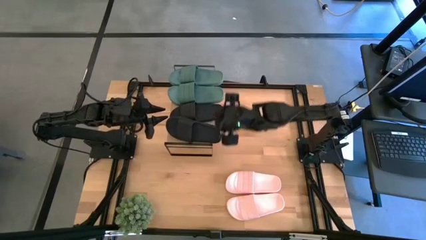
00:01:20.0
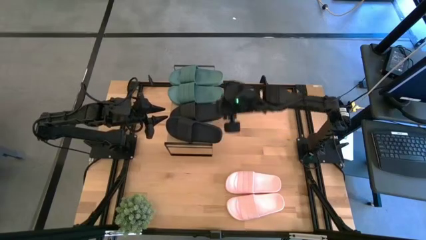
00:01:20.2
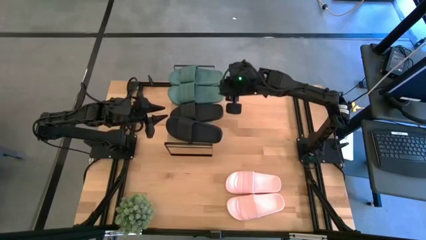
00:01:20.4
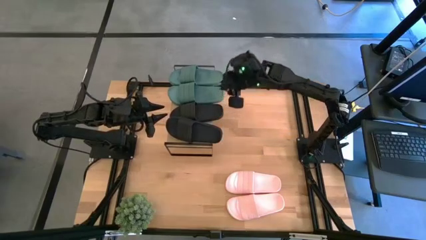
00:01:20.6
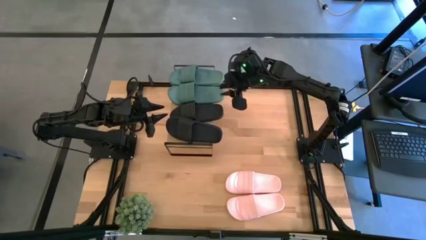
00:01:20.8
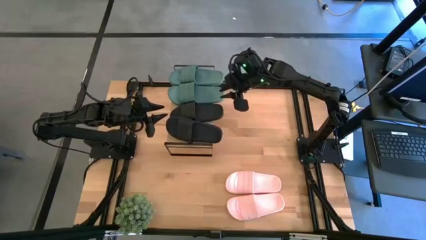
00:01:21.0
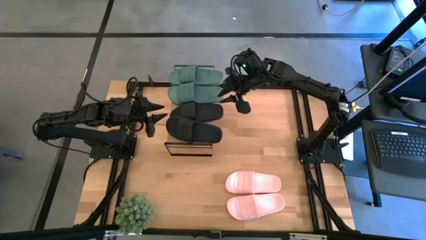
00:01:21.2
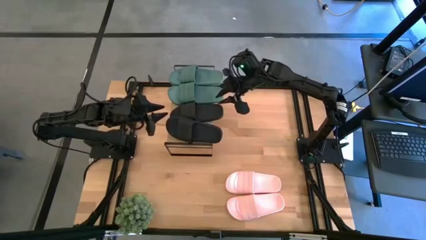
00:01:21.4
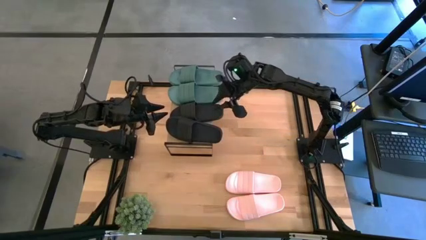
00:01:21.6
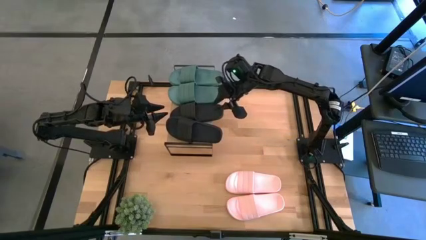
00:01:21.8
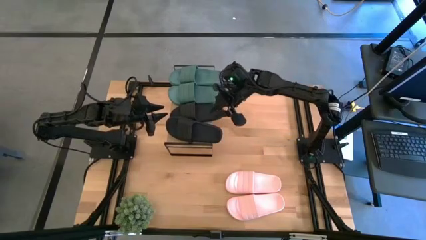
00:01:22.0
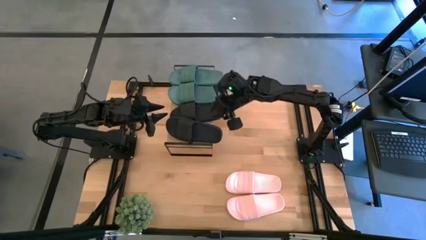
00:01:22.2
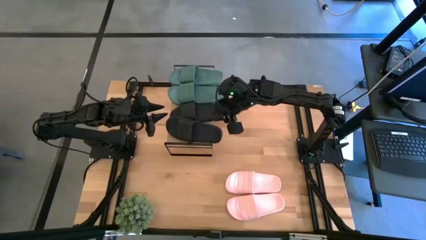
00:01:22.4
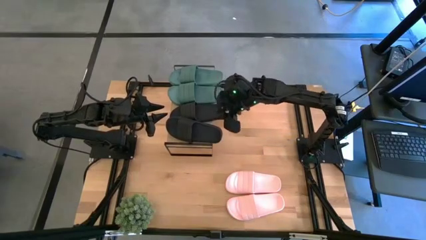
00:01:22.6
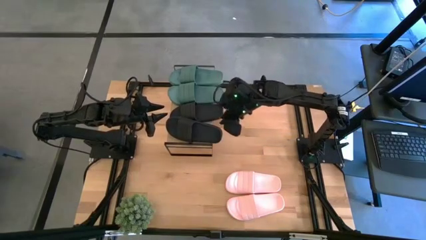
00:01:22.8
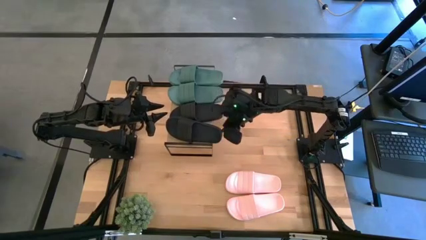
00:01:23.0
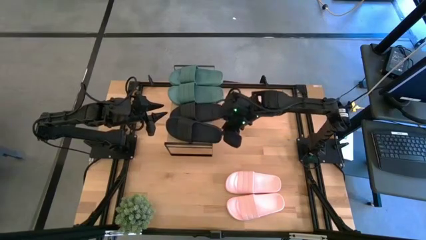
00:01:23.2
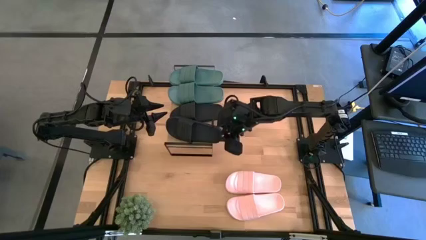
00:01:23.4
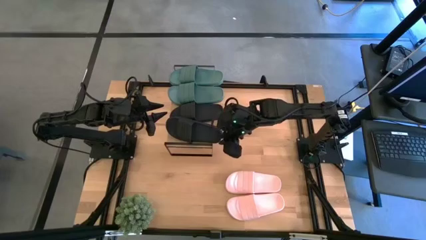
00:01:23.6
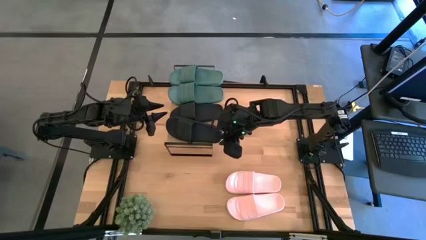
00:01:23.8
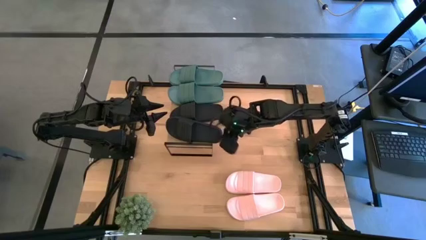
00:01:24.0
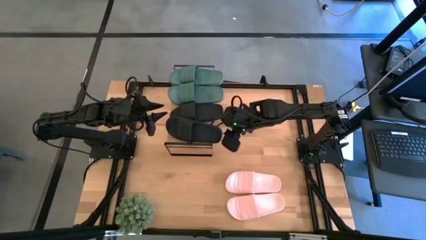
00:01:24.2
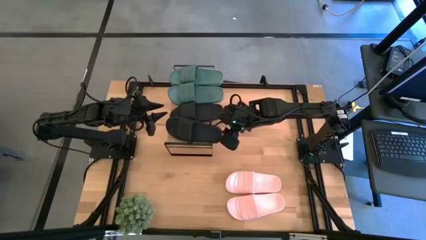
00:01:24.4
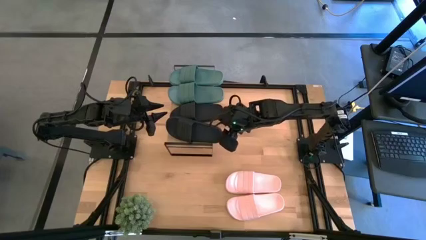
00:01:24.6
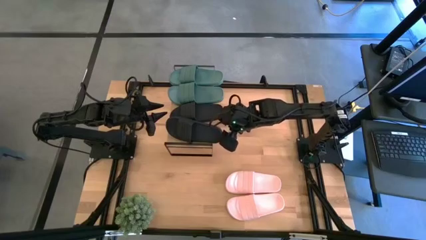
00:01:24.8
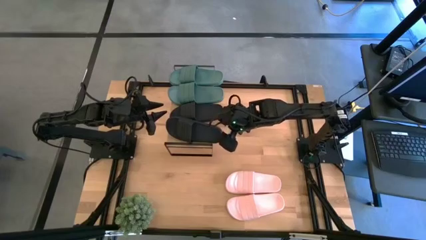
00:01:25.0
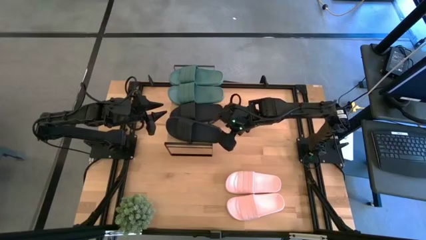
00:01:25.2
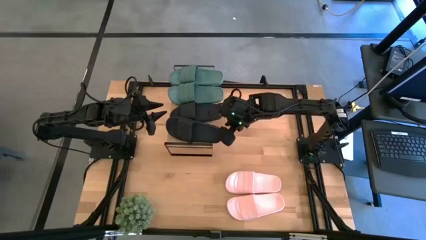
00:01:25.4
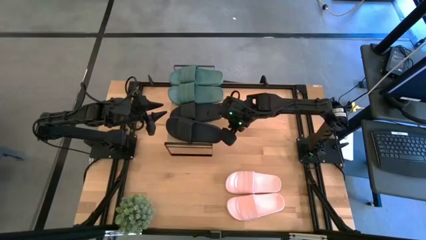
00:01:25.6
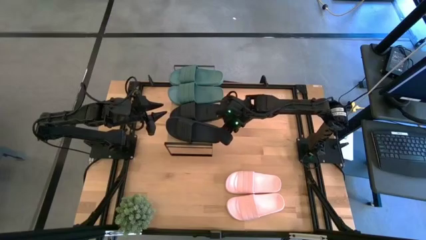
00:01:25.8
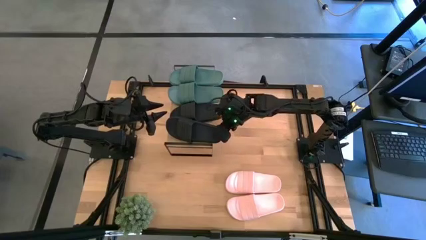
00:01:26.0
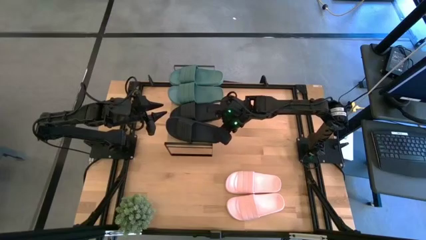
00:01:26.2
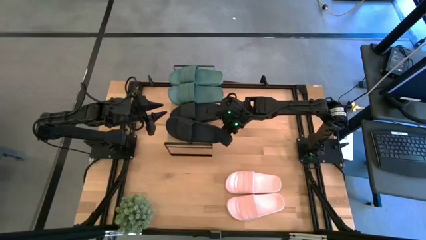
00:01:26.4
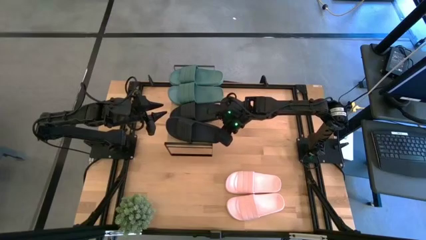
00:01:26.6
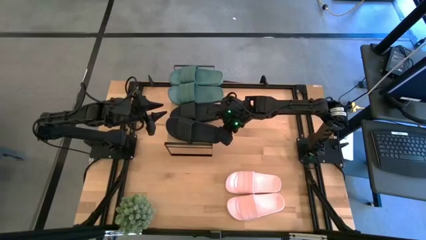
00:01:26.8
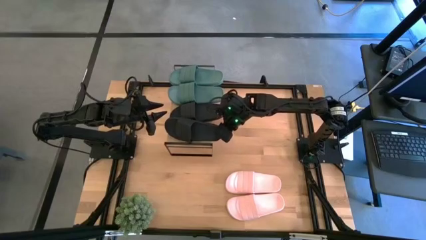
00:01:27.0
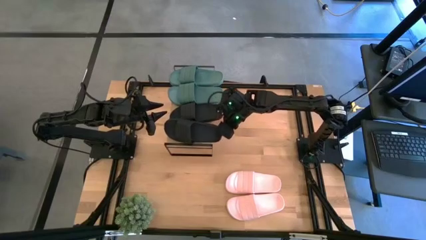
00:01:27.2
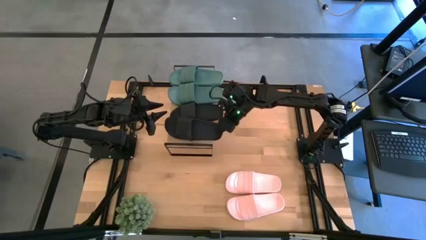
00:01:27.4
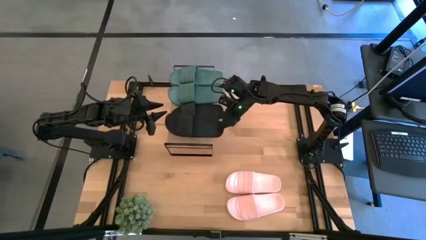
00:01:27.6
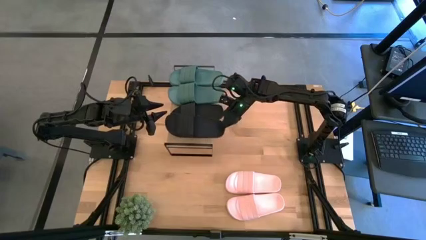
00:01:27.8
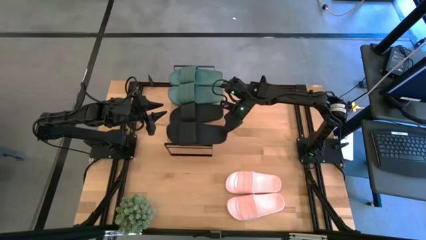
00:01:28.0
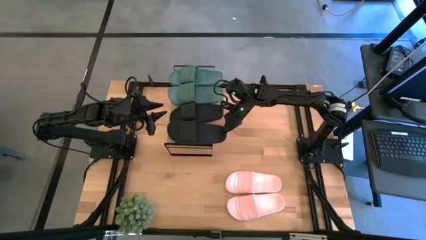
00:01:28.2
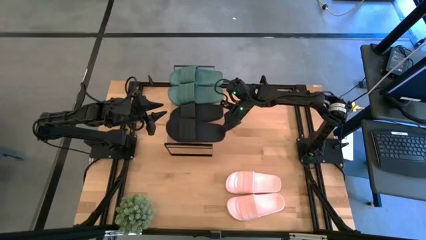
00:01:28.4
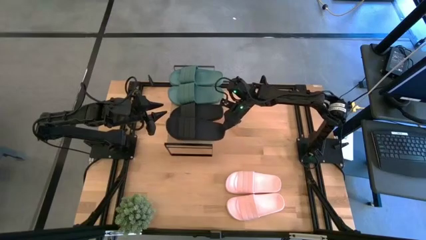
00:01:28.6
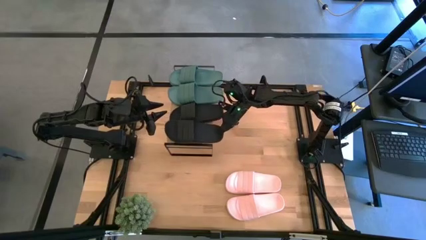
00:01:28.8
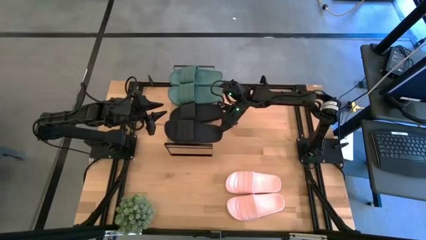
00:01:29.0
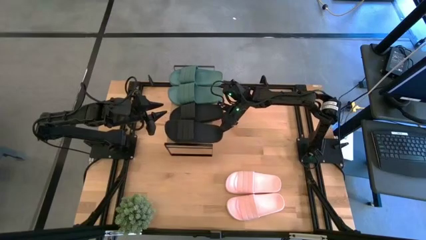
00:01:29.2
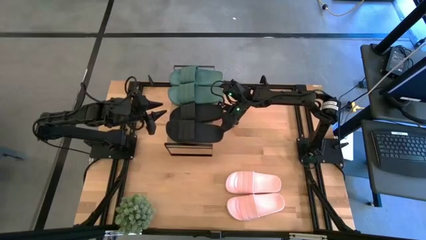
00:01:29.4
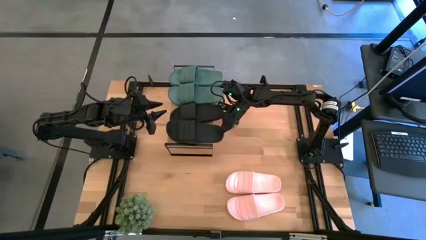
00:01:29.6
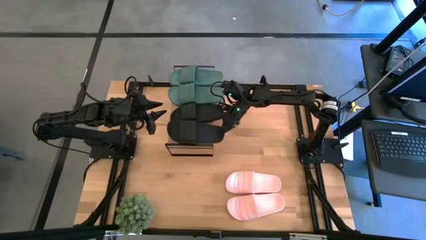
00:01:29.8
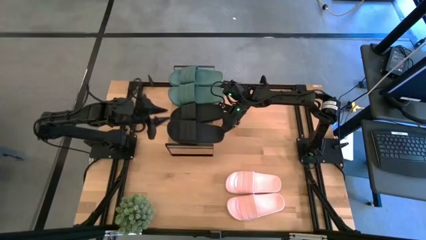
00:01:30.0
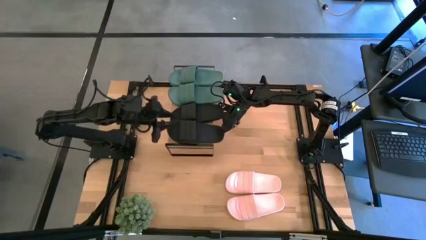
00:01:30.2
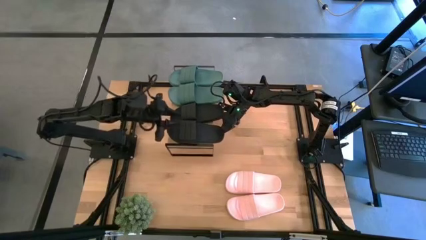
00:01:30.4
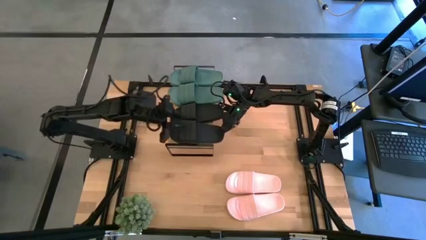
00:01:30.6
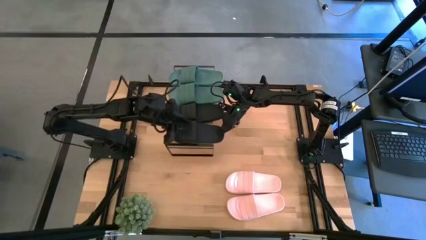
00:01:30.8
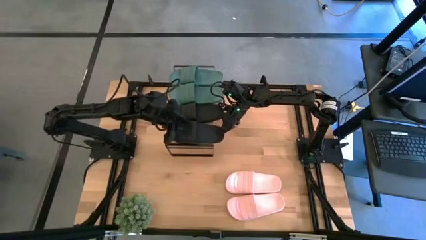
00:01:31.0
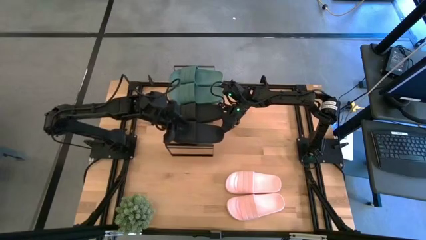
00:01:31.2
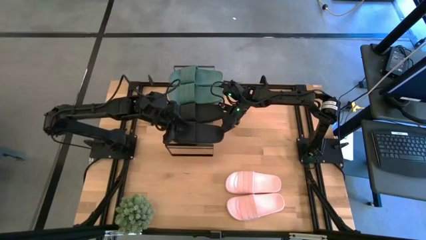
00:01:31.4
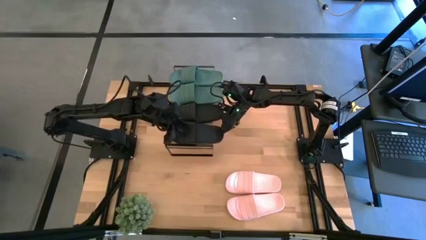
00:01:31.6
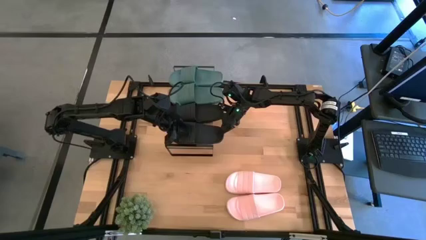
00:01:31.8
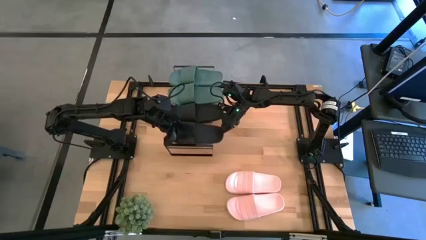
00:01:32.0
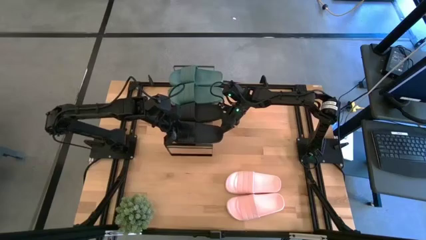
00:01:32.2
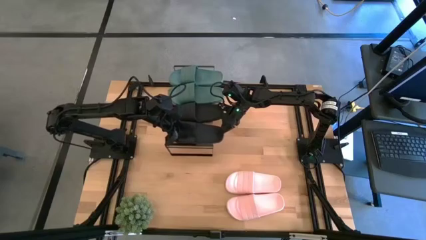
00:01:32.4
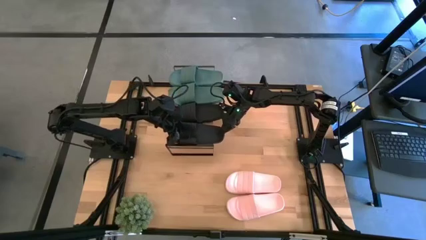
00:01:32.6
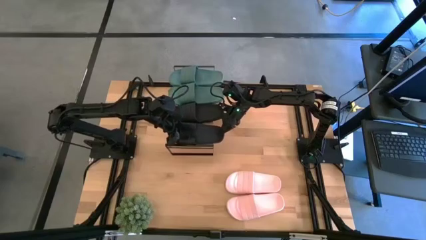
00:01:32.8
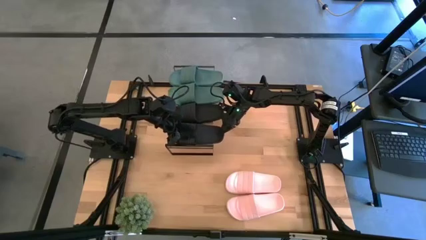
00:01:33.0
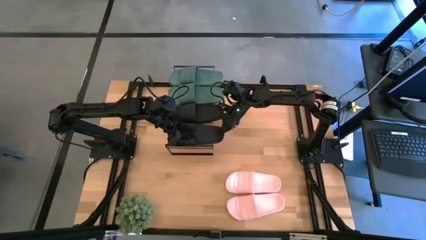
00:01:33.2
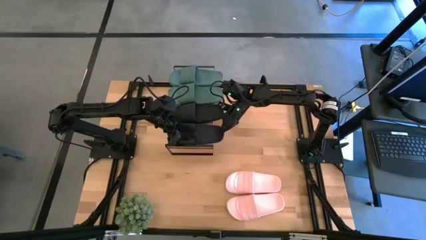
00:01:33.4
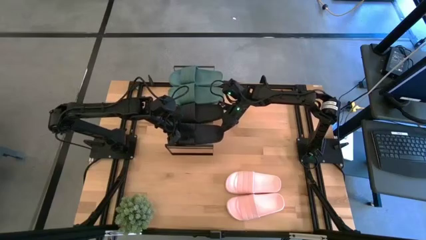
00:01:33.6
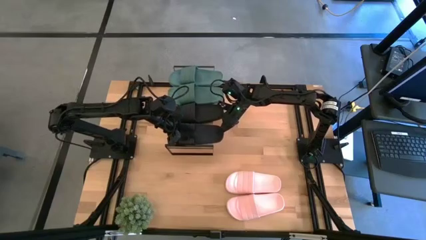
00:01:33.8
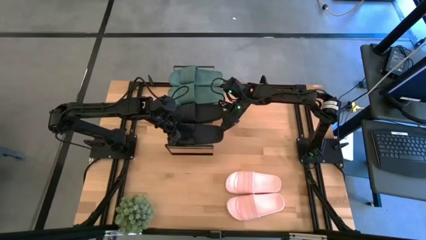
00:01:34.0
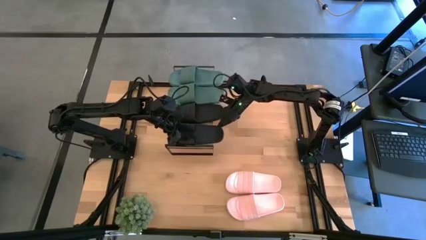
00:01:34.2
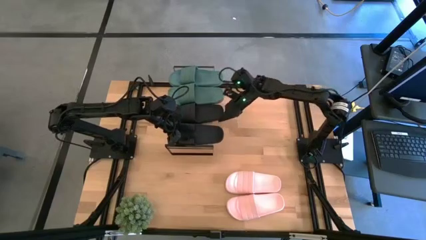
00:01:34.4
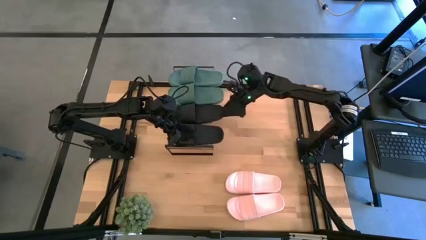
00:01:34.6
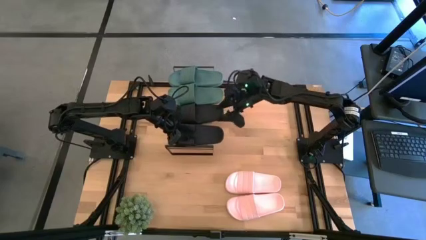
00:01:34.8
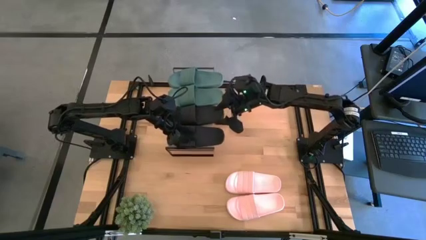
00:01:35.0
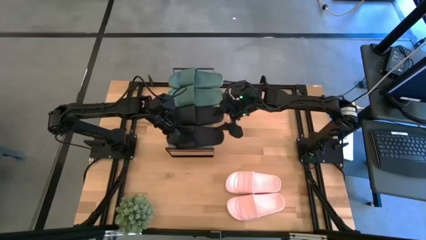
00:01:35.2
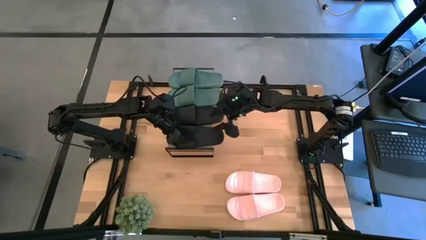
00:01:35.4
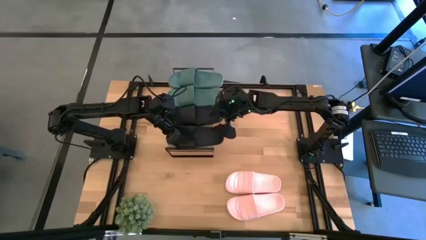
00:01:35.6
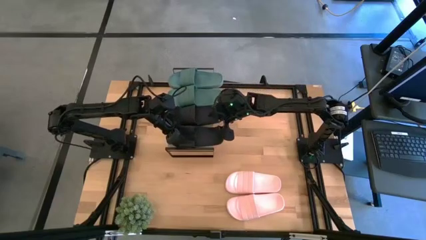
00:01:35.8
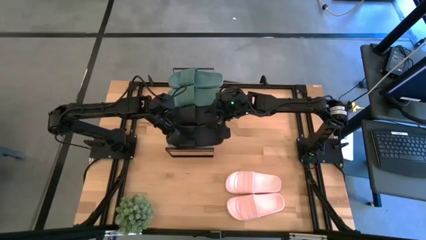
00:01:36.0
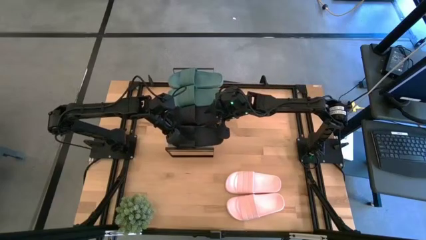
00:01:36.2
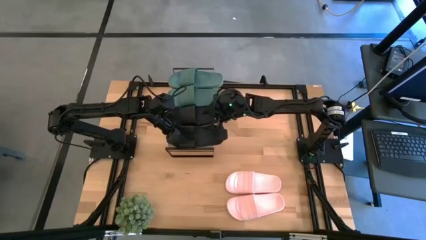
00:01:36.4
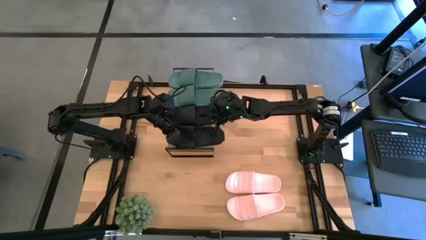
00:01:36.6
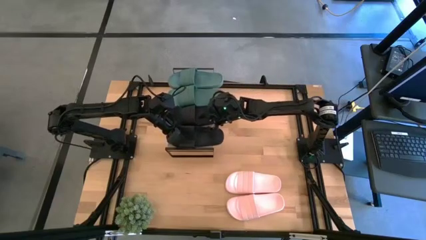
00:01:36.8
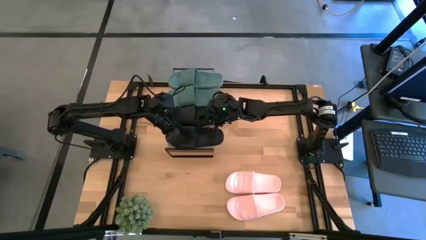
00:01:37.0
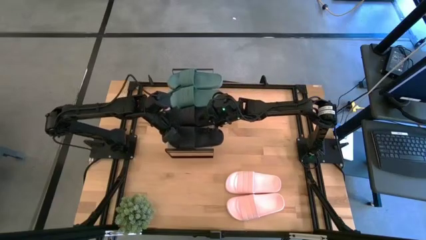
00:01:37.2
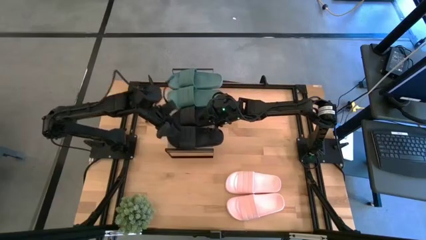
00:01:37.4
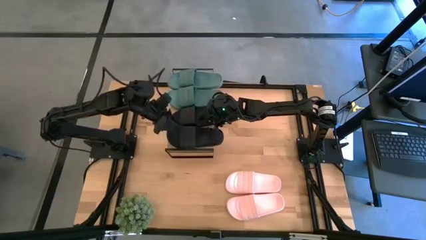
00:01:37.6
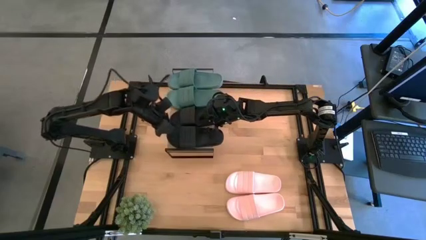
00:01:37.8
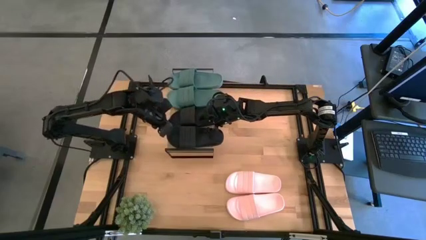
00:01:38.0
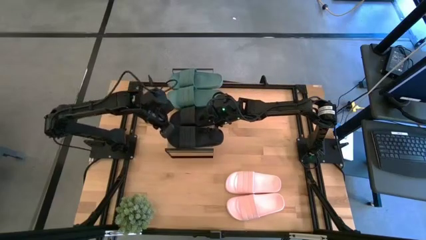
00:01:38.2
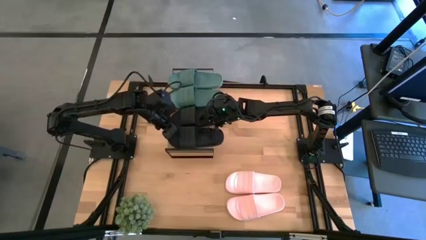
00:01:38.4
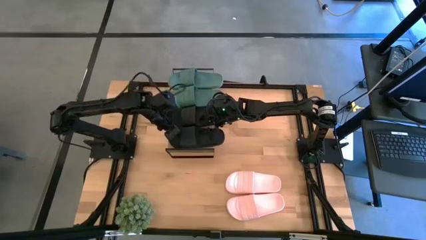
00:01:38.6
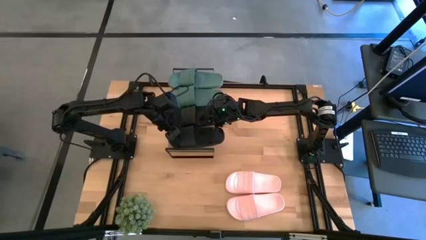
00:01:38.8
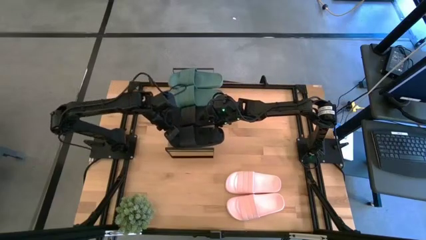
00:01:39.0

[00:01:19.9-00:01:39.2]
Task: Pick and place slides into the shelf
Put the black slipper on the shelf
